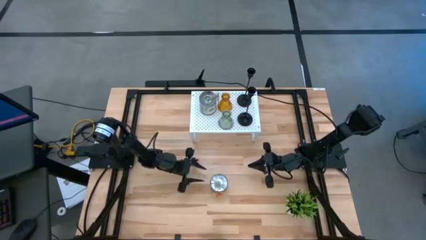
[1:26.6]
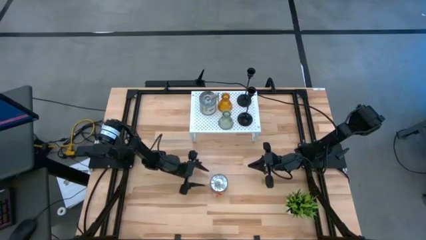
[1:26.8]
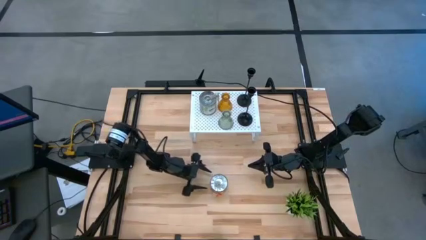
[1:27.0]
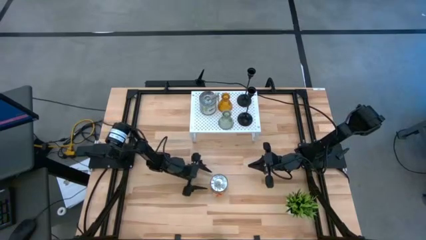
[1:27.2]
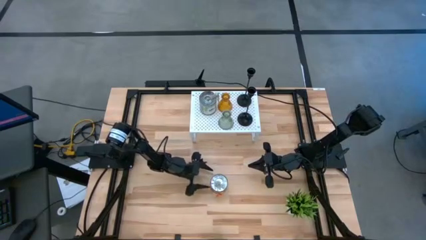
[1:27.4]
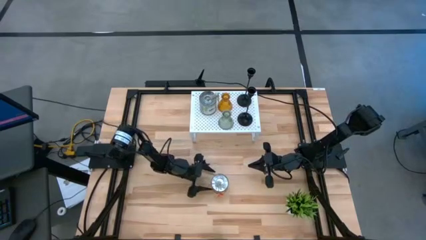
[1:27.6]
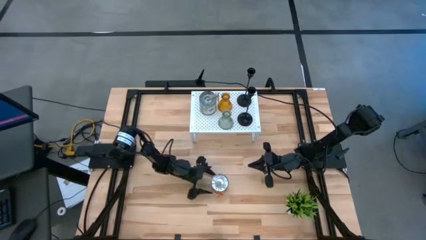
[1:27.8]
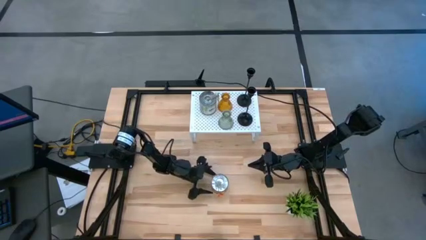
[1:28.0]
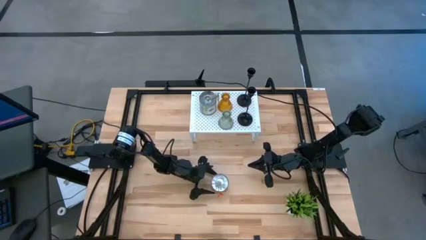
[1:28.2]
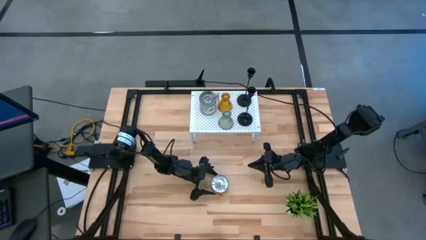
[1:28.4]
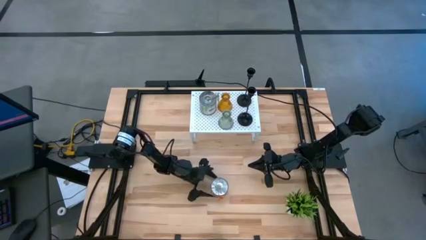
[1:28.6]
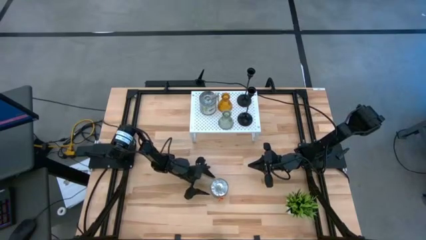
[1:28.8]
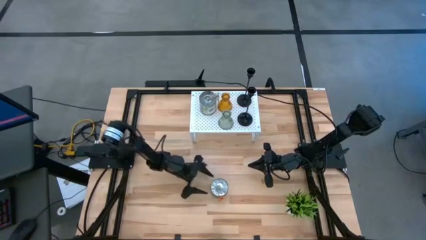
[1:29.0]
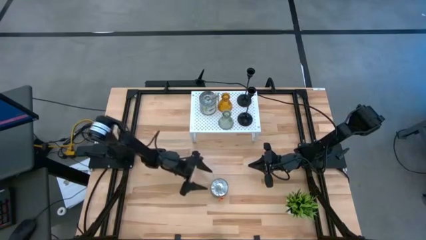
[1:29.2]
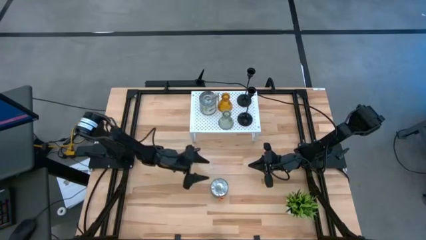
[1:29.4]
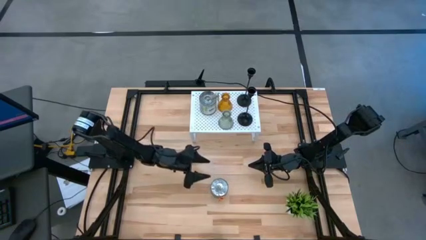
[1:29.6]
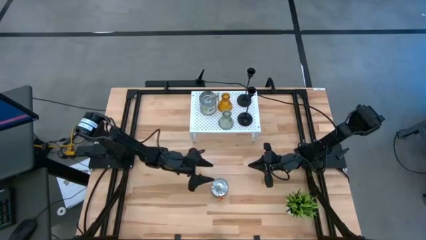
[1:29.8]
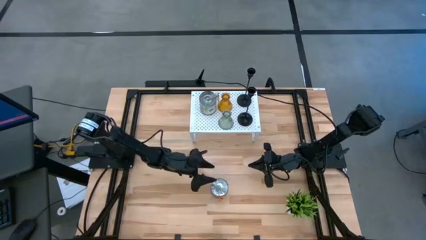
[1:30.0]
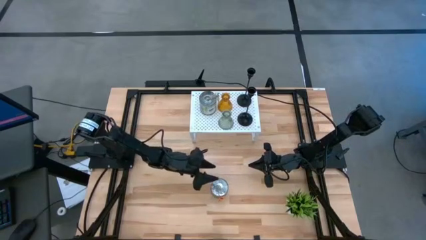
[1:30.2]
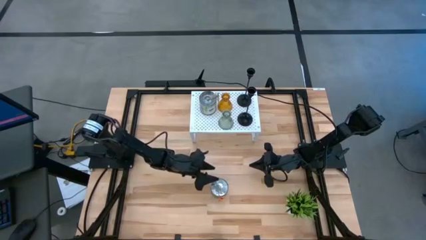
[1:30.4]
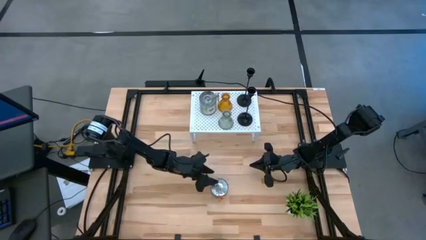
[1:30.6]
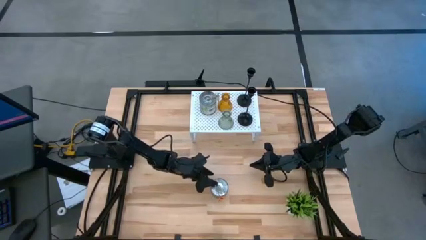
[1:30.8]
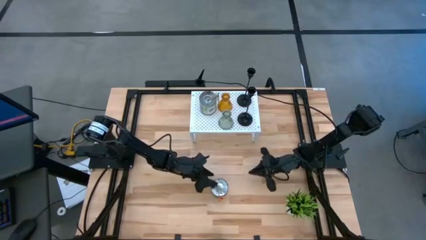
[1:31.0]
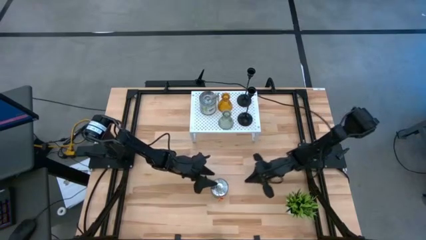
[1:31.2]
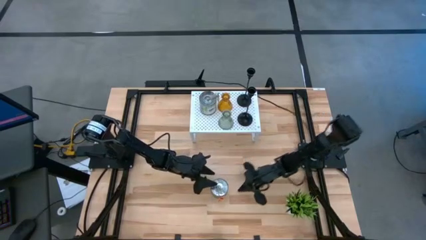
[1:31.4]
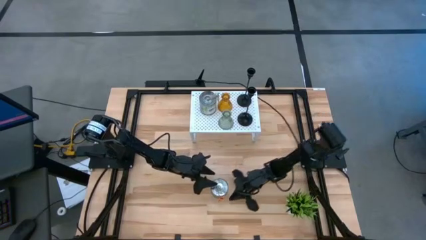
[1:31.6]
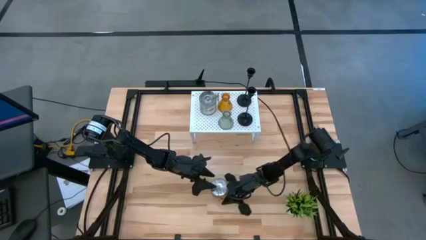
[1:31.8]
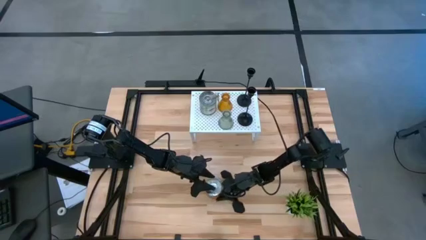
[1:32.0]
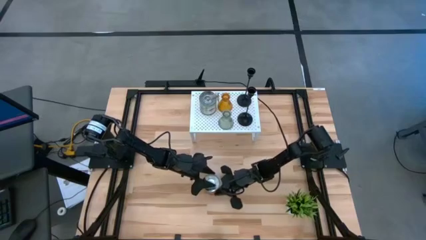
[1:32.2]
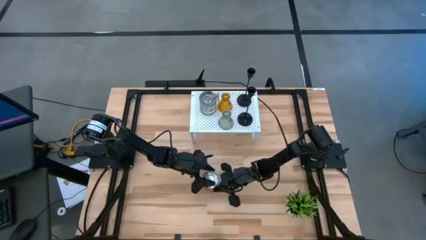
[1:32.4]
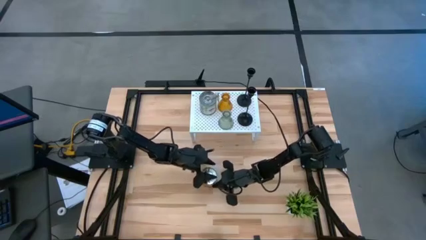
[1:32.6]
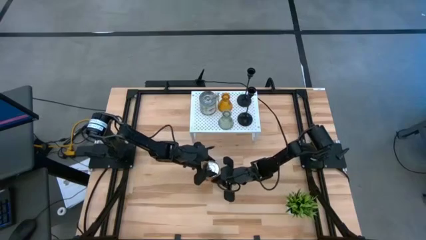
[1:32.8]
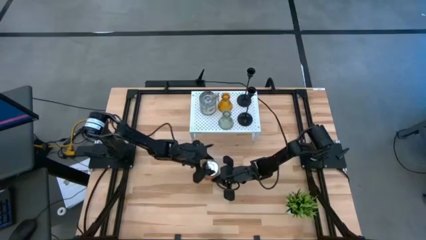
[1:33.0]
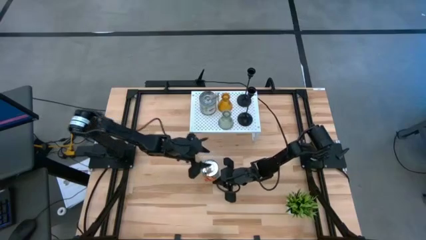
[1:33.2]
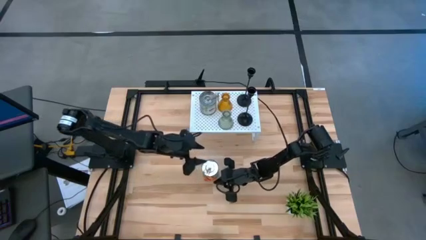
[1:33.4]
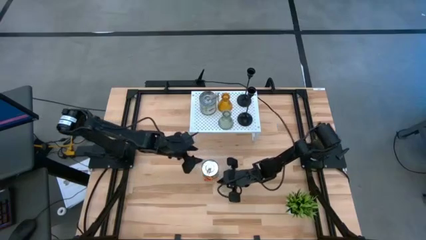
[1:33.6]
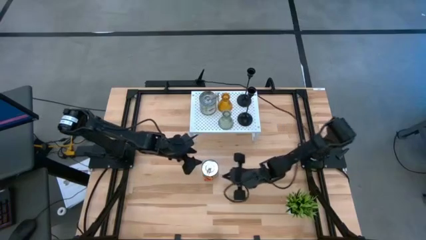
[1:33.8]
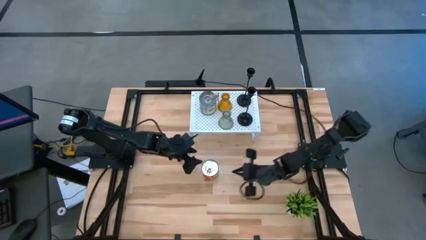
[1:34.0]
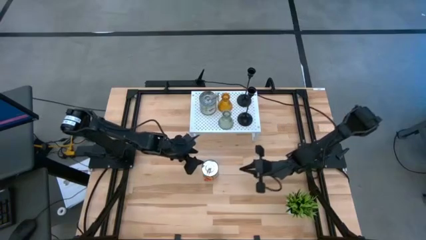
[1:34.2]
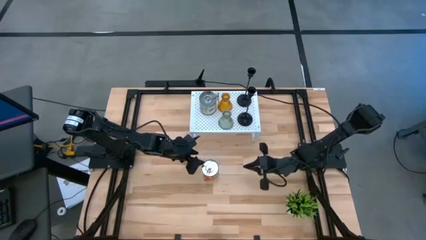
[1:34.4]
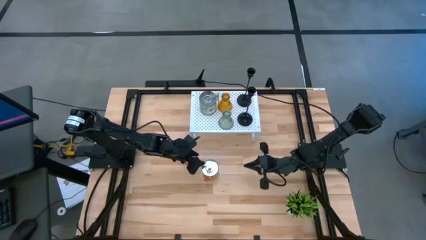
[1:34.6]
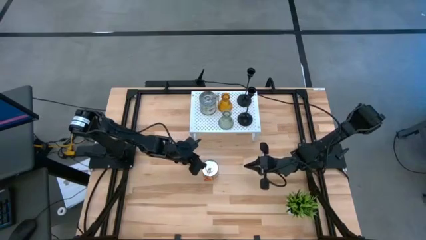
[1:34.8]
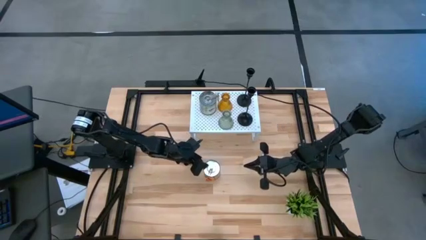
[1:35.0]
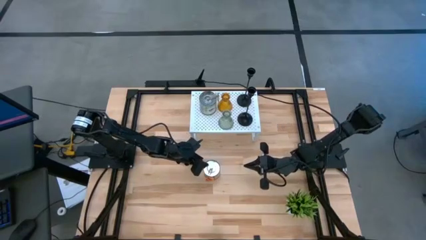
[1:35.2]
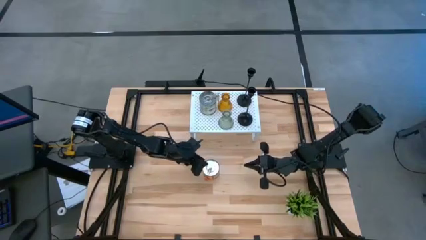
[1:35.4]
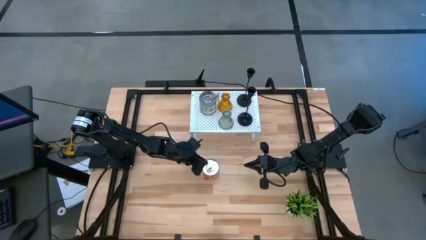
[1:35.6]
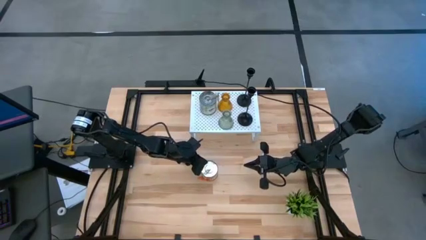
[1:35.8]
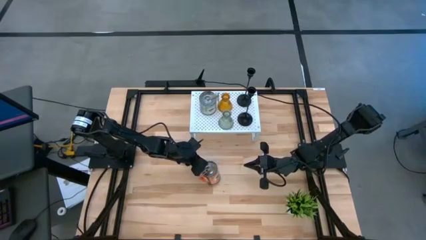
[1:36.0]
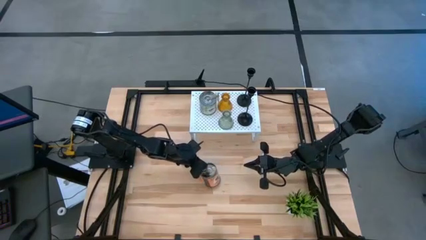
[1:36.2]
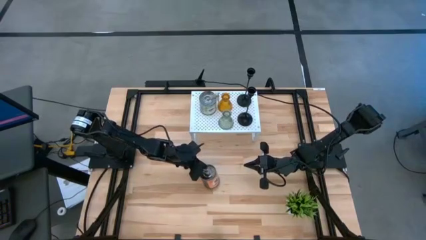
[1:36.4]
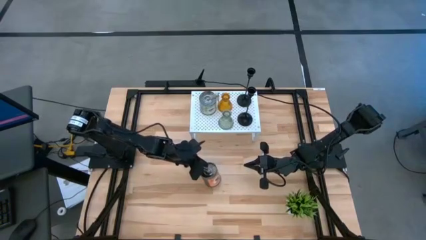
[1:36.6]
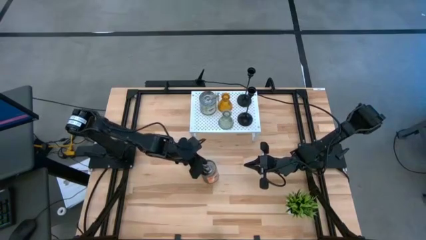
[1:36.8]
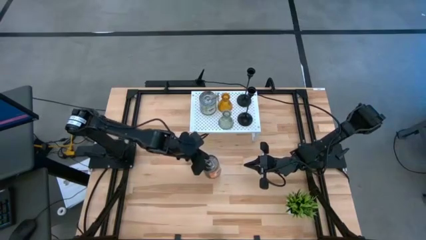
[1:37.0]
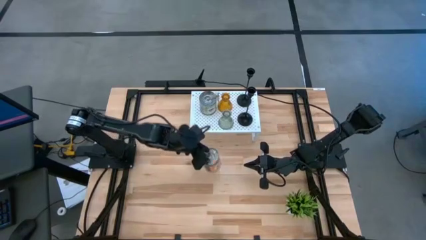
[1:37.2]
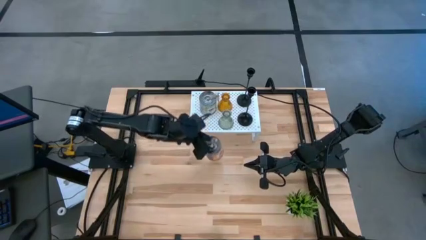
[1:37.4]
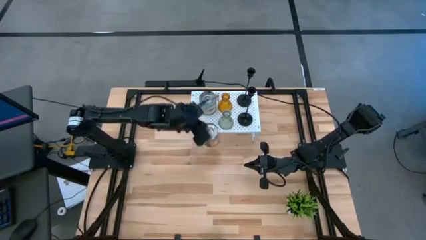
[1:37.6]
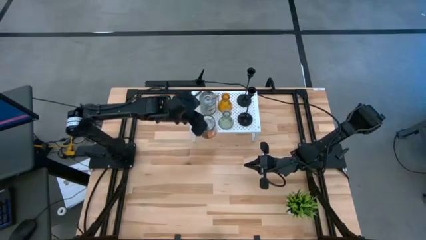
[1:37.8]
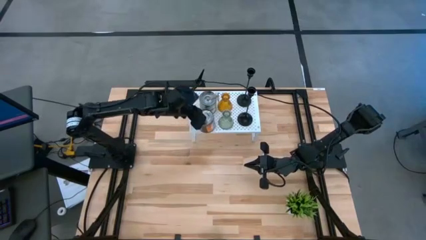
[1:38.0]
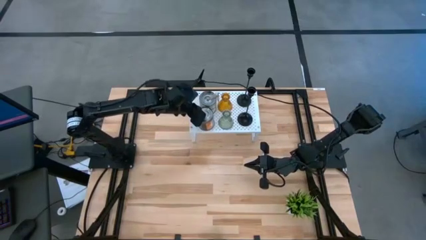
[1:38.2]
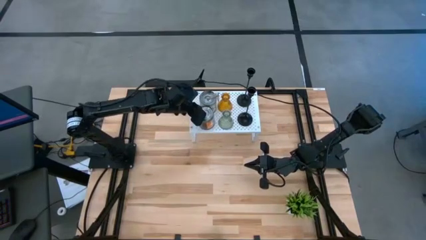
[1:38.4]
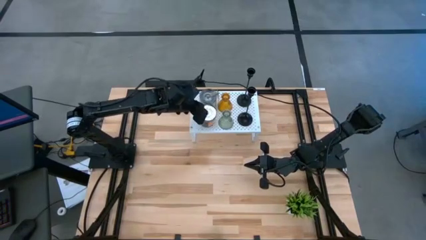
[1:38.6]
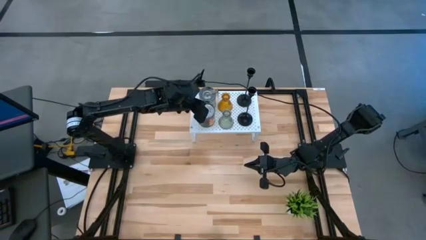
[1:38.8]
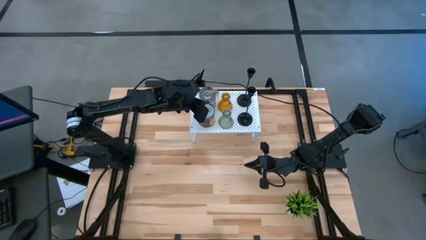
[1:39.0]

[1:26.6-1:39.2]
Task: Pick & Place candle stick holders
Put the orange scented candle on the shelf align with the other green scented candle

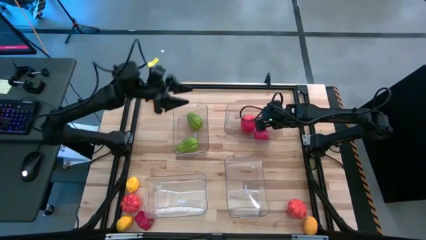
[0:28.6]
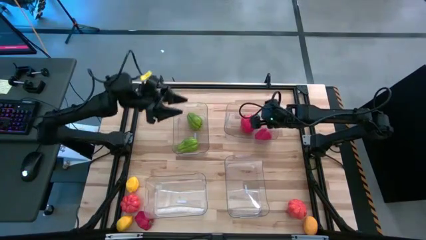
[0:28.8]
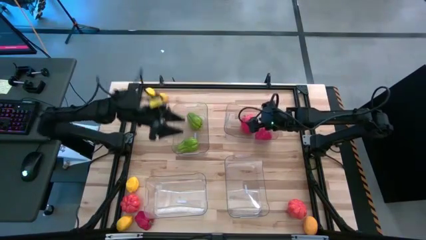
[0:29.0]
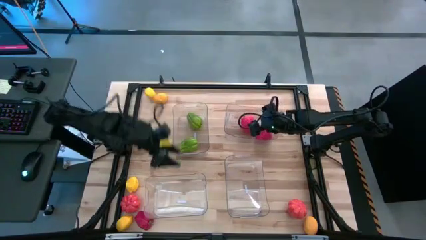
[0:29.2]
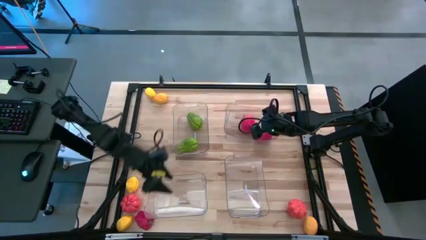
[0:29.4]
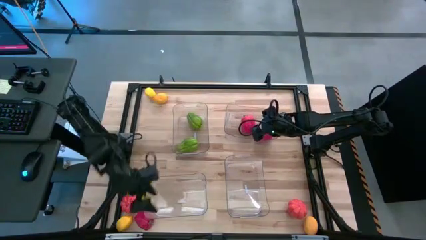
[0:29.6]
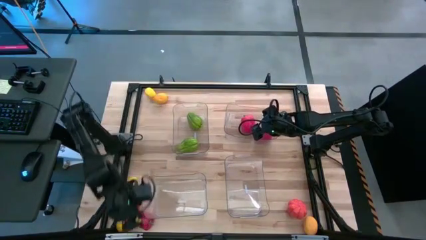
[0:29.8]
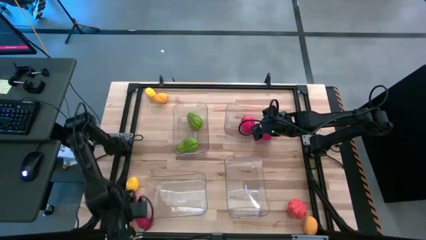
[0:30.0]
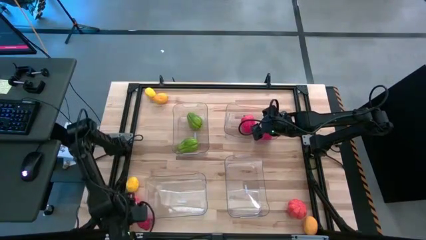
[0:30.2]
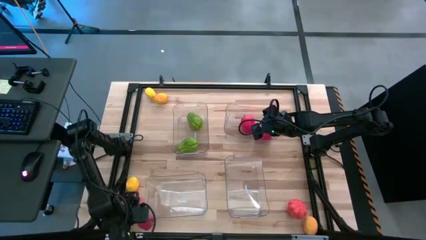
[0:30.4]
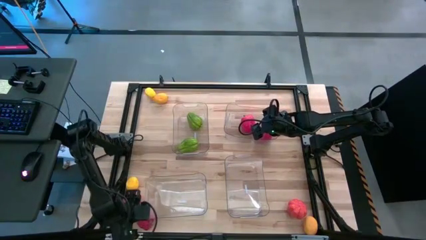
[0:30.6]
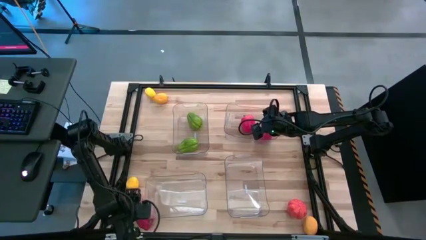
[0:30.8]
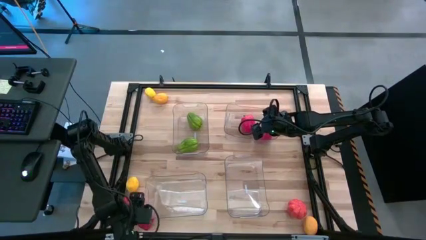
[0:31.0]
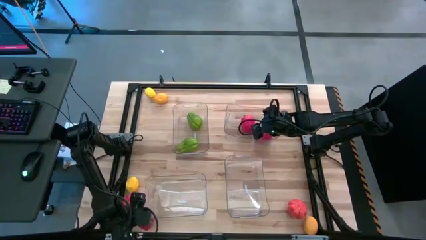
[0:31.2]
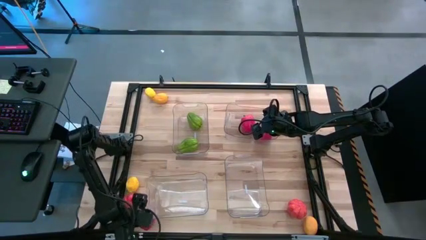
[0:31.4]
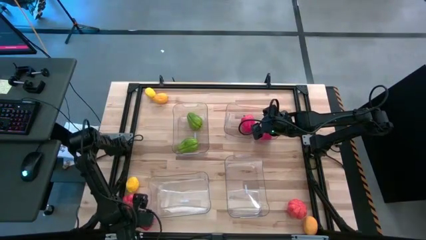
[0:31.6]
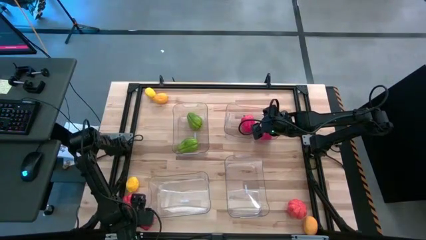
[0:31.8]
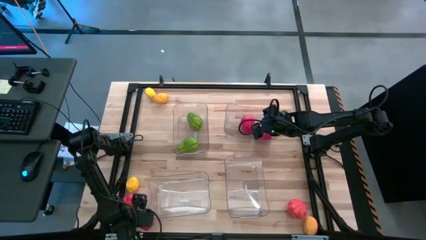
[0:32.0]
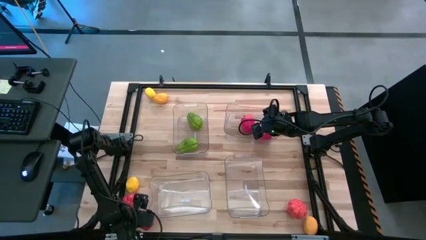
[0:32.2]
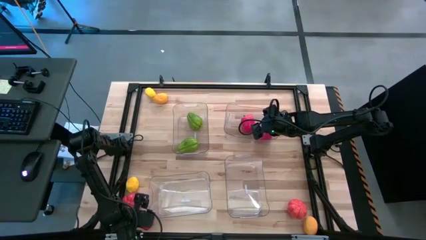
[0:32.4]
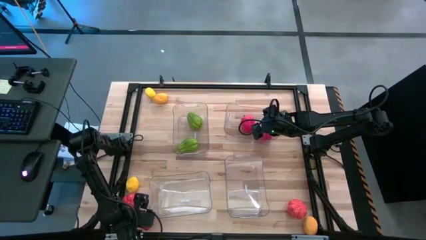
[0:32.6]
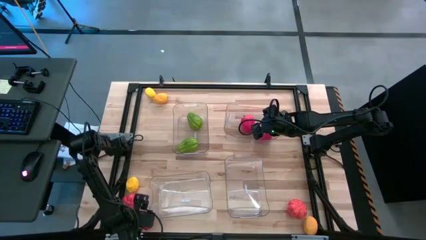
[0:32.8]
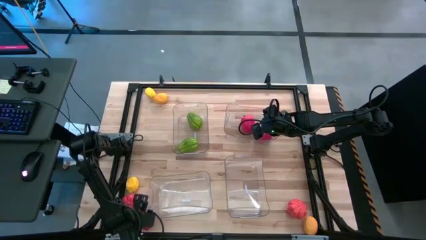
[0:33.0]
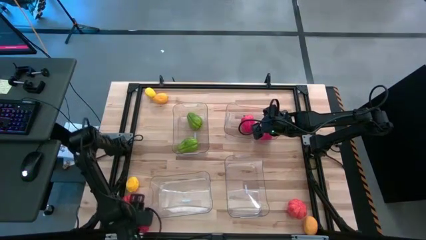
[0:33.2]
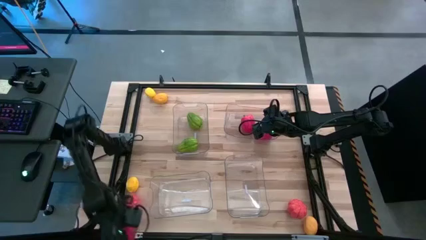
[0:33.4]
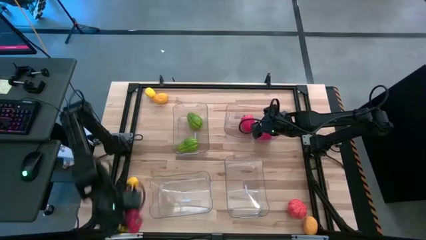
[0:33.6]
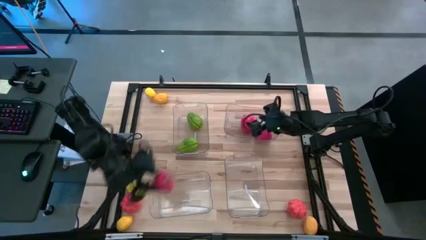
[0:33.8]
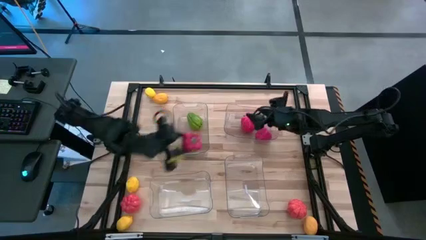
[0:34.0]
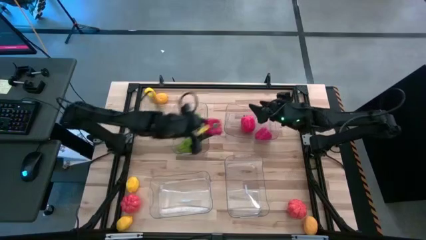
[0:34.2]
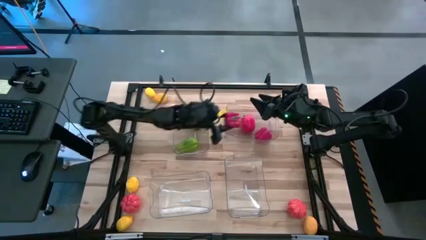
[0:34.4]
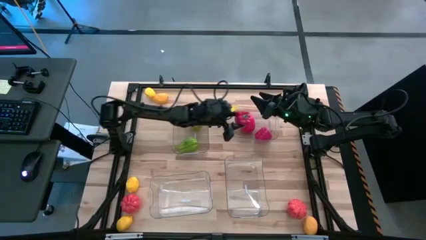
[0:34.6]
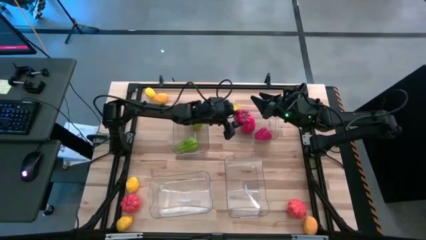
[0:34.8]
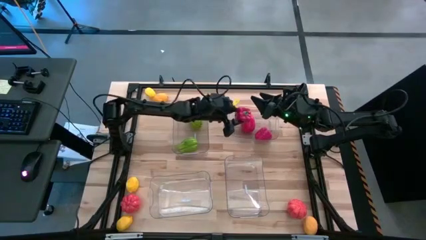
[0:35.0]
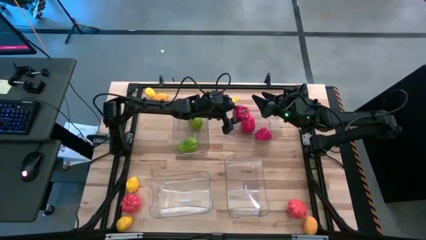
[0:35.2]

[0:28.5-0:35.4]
Task: Sort produce into baskets
Put the red bell pepper into the top right transparent bin
